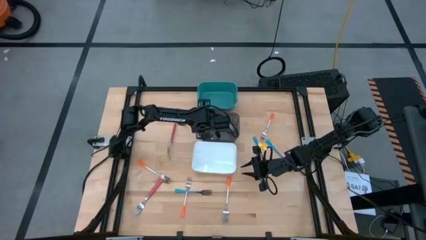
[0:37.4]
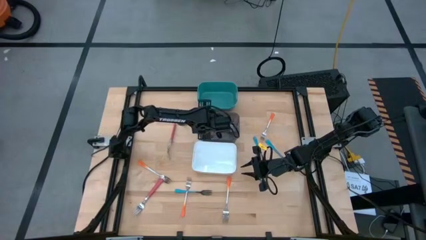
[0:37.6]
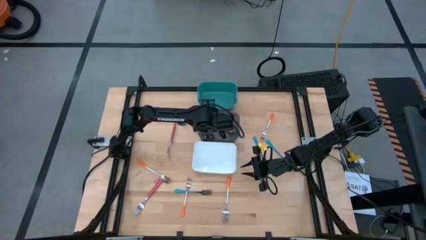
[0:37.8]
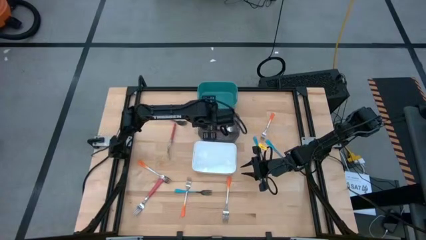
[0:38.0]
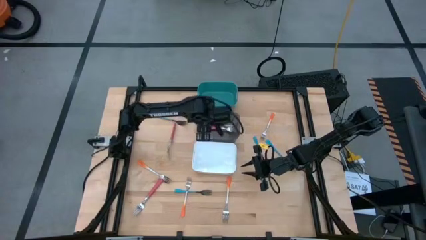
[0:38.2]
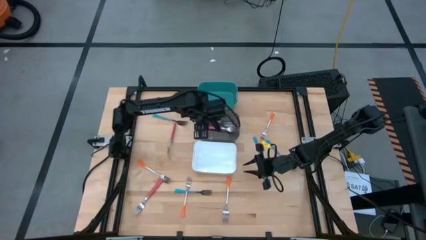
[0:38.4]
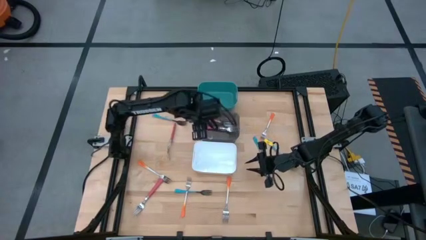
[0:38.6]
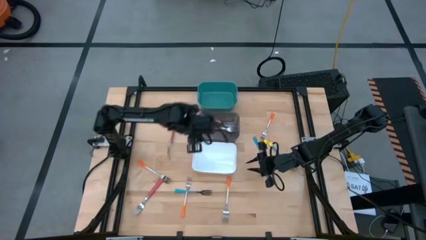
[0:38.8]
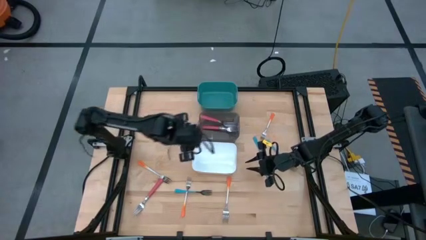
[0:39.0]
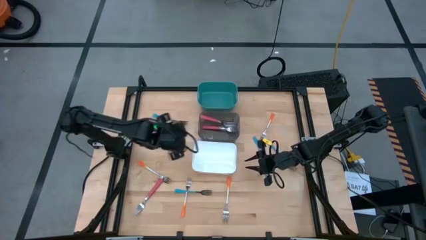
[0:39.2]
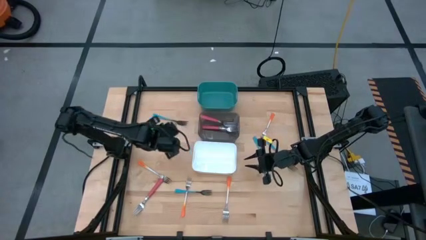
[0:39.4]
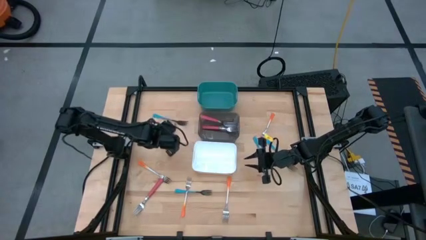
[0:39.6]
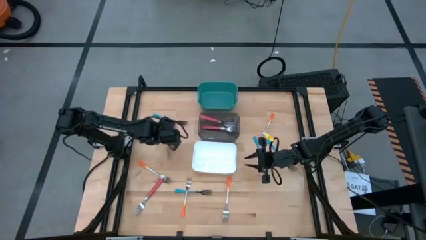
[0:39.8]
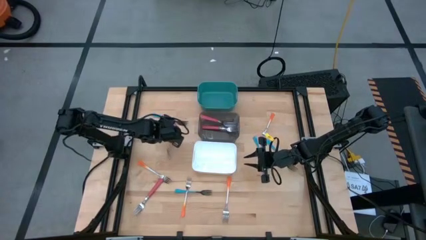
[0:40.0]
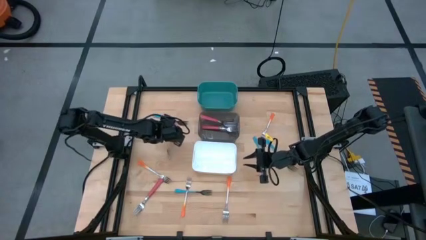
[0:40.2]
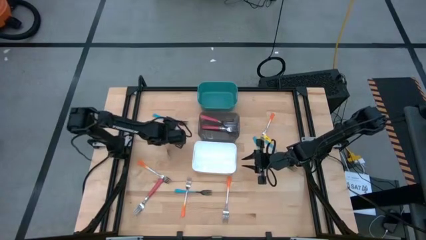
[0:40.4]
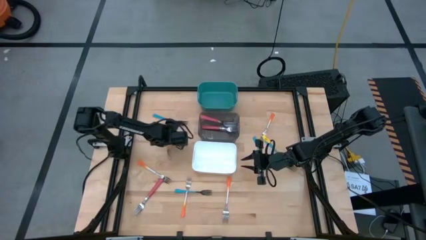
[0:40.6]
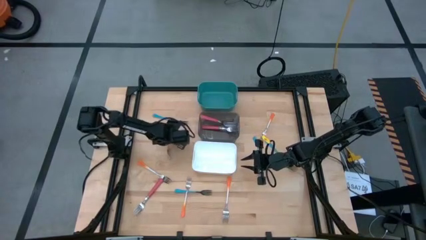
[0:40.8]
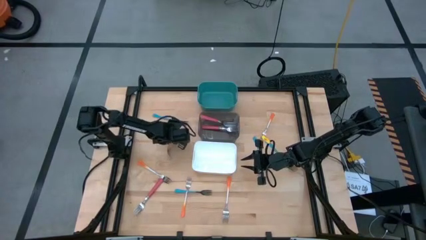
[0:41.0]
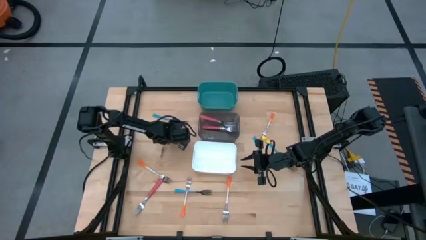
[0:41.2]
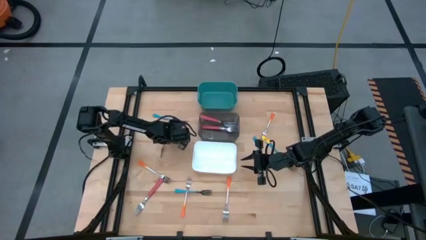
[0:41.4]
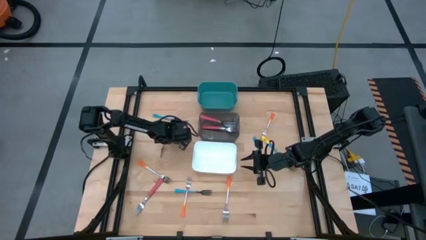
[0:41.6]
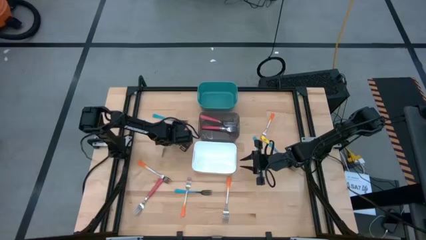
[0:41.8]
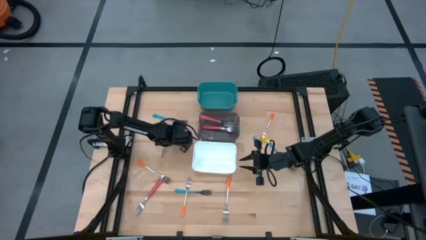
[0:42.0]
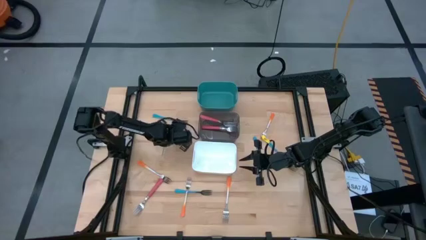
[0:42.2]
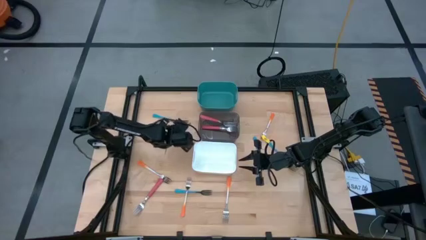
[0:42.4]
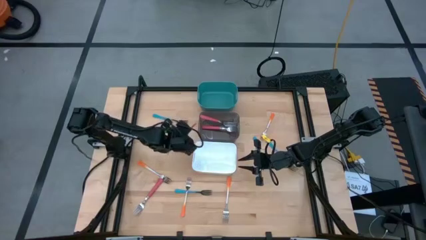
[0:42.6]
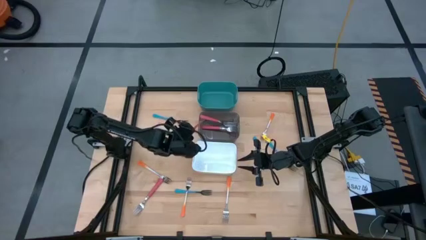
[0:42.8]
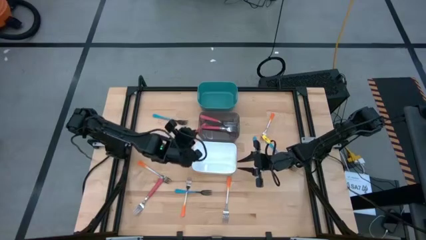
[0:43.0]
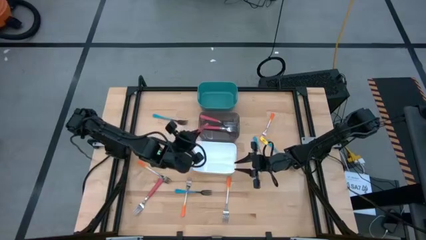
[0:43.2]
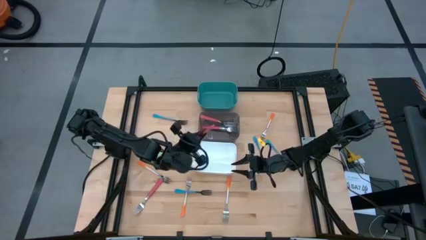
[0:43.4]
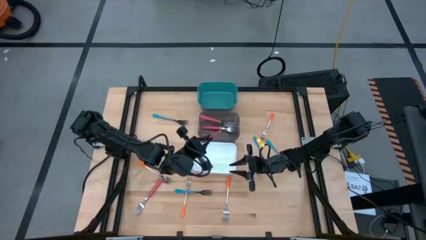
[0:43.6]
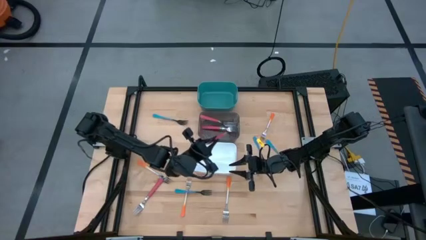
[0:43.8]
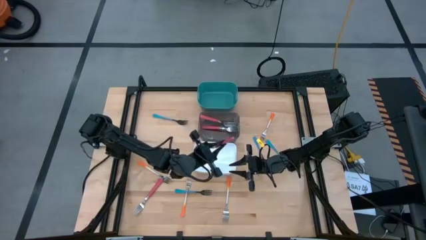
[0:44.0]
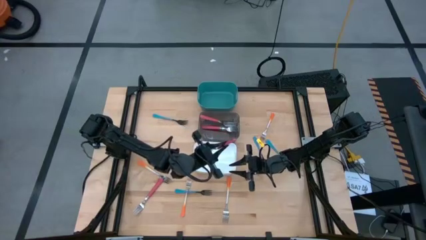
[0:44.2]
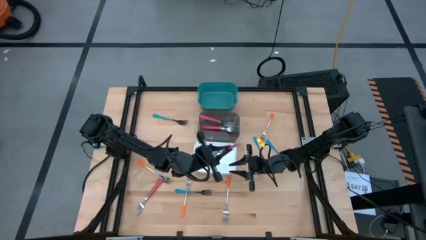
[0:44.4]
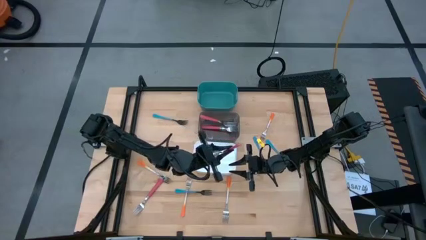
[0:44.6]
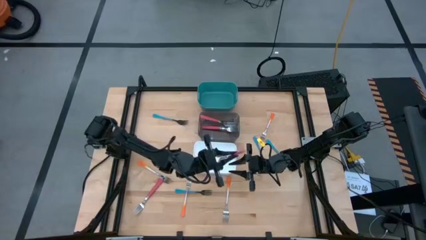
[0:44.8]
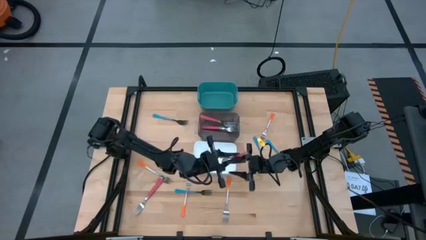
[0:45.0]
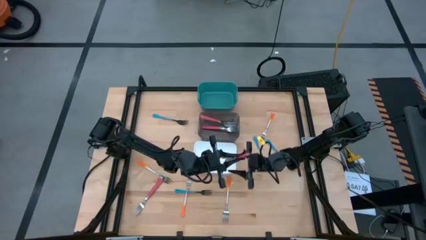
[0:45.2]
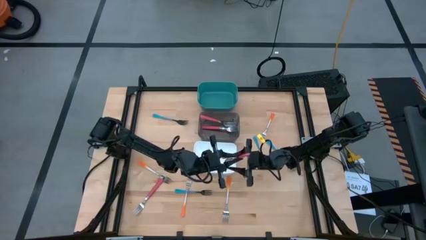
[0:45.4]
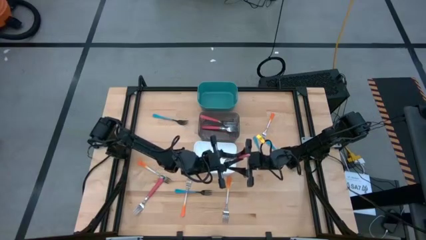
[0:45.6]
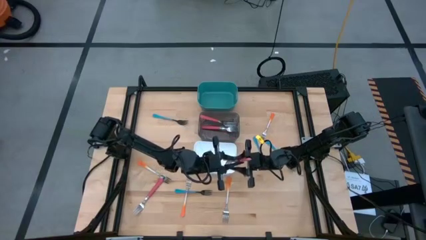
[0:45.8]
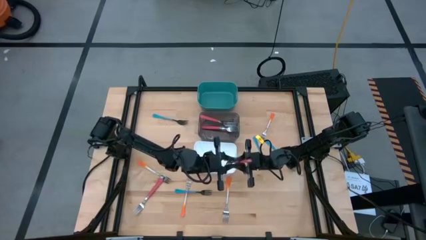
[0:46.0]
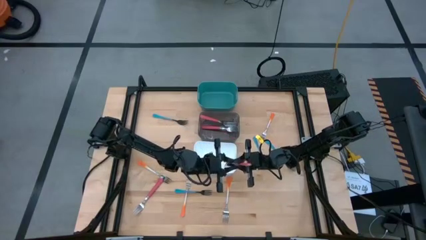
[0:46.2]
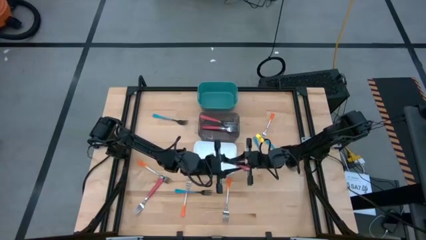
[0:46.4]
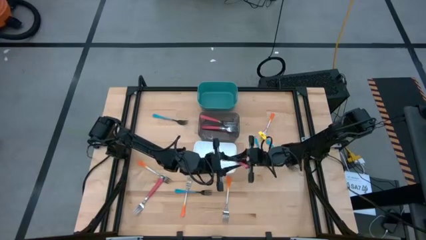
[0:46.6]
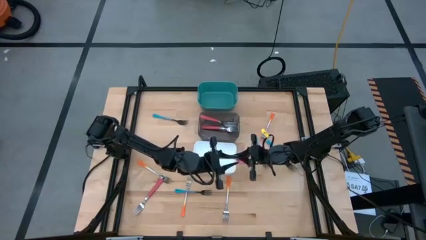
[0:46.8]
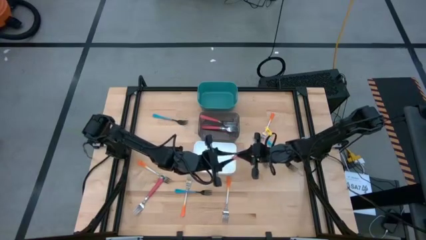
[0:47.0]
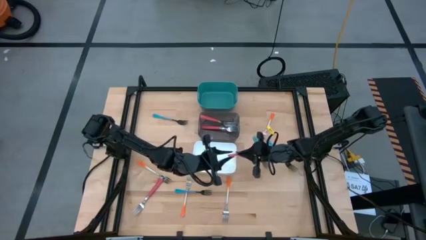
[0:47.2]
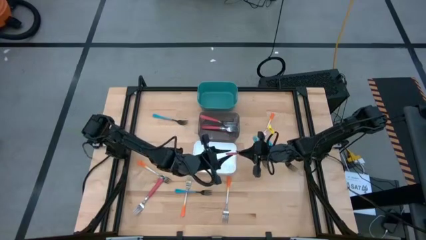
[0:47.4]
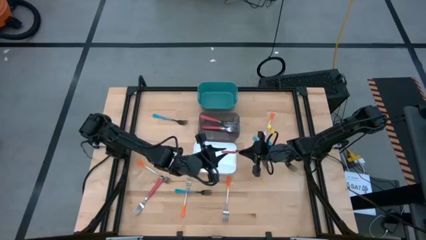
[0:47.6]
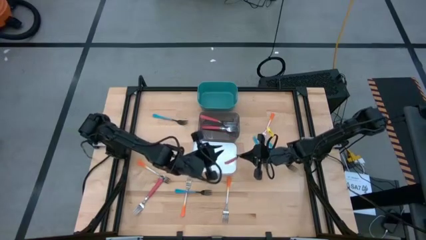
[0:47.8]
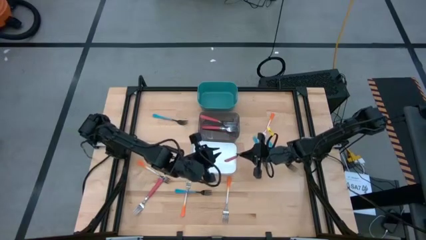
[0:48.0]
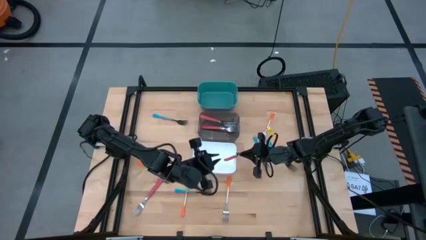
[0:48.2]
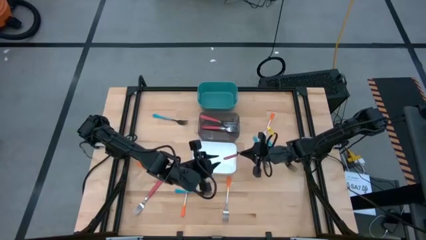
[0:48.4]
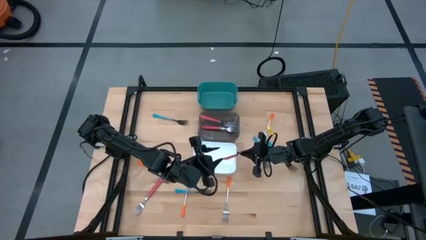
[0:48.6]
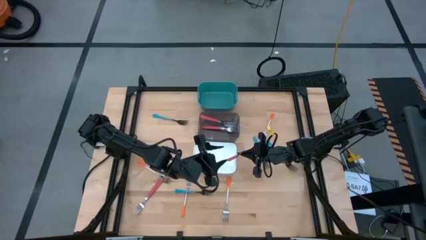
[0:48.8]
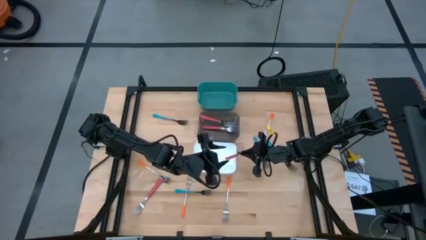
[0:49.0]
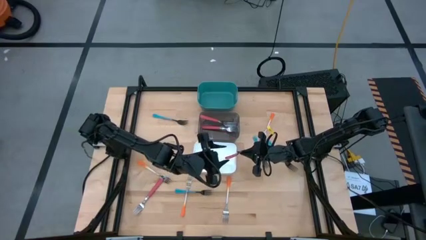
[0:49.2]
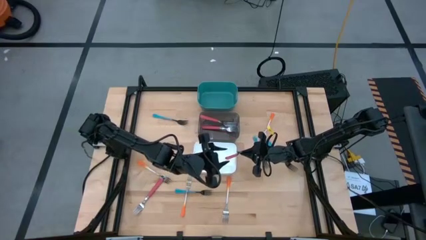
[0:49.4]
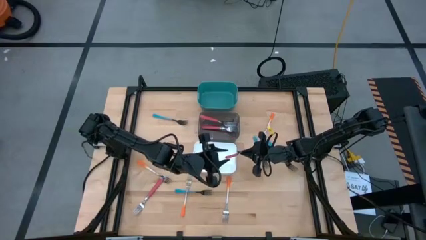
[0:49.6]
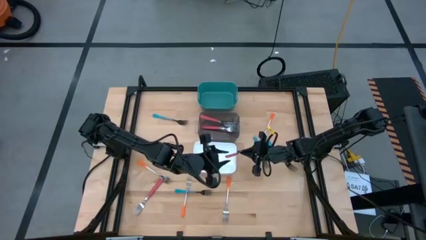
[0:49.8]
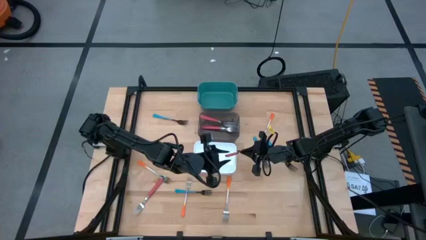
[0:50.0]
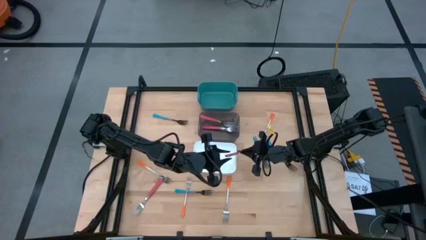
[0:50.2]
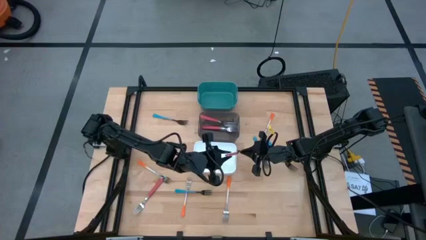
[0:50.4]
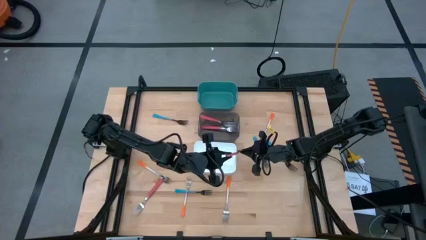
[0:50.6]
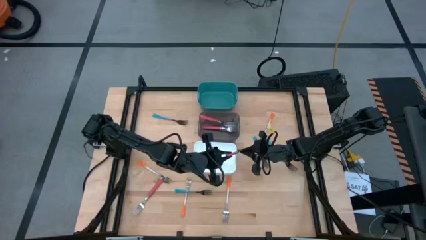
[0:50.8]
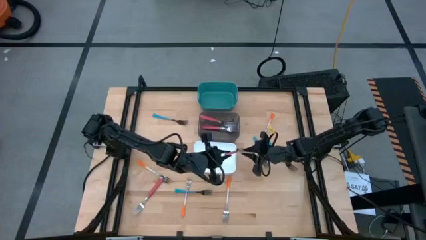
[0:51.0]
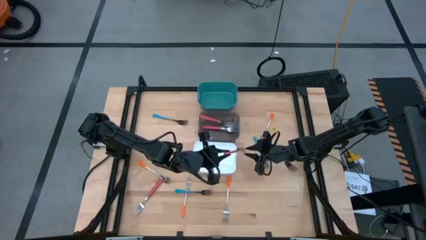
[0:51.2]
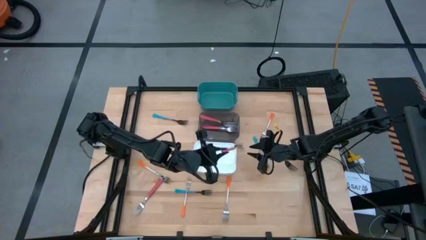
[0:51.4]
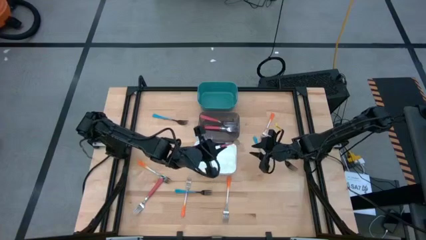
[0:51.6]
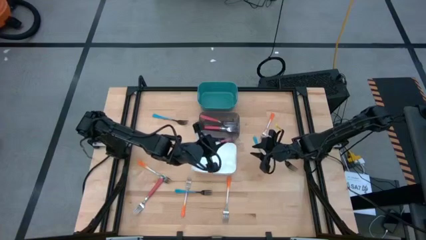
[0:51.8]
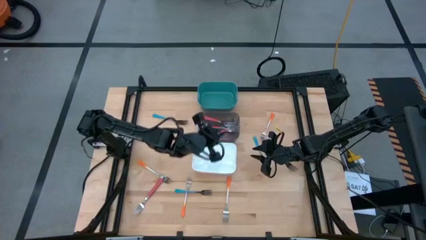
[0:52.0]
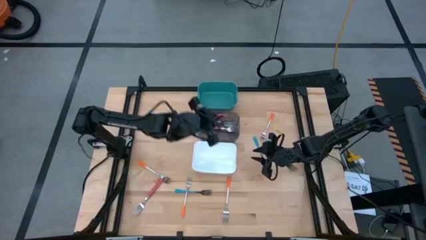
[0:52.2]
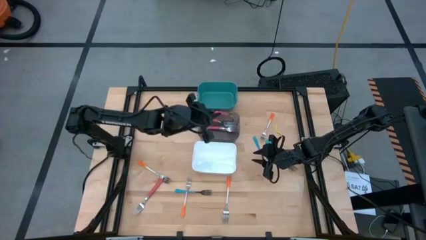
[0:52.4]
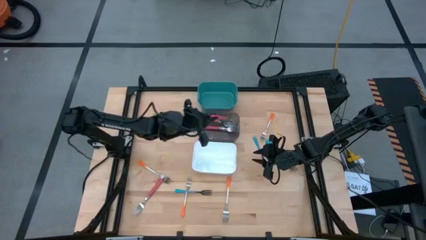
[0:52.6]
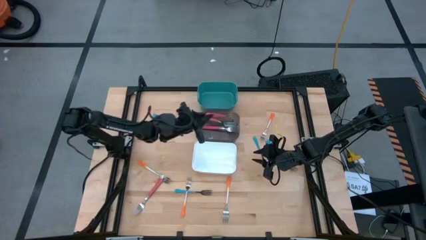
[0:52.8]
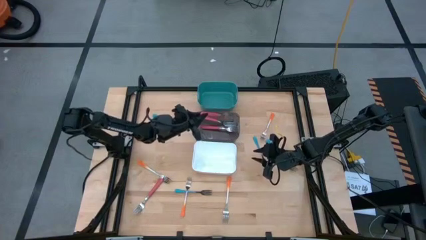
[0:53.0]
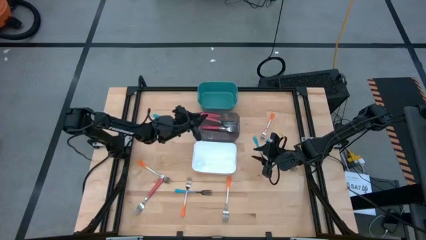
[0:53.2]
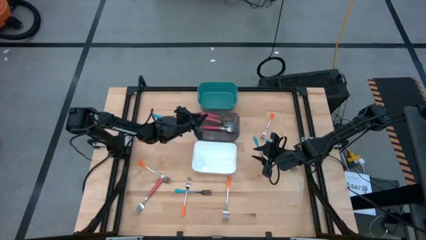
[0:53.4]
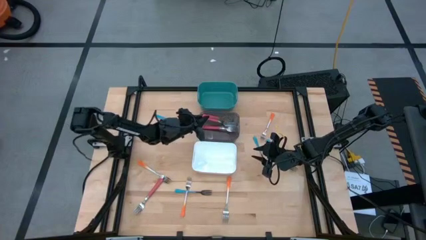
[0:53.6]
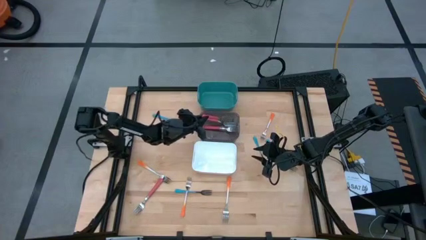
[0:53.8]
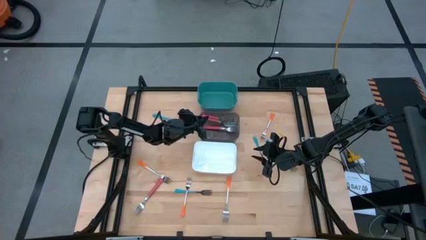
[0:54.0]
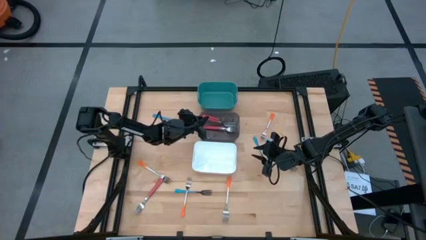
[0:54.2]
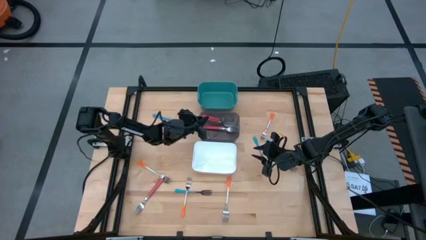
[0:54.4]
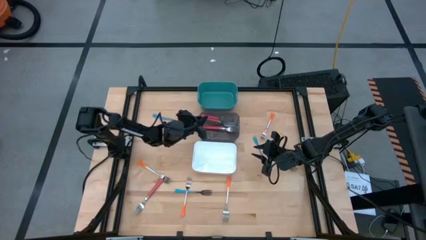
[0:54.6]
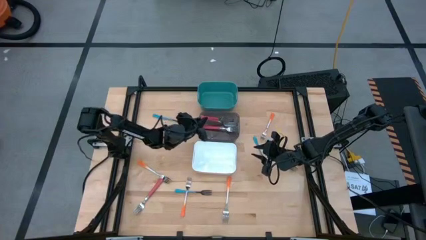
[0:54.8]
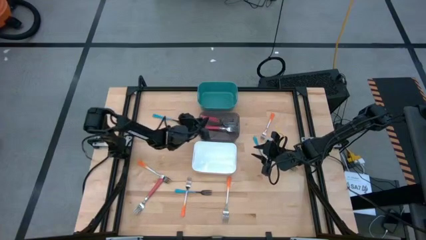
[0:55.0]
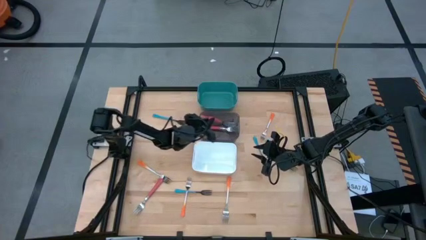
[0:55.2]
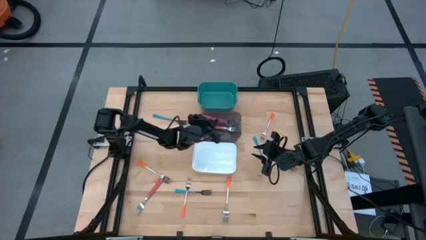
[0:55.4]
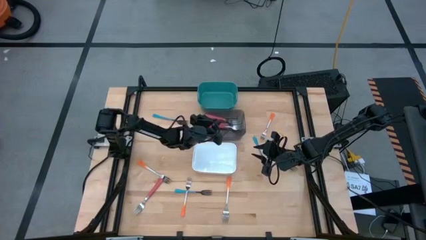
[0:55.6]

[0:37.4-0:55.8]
Task: Sort silverware by color (type)
Put the top pink fork into the black bin
